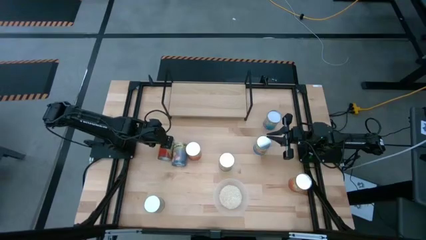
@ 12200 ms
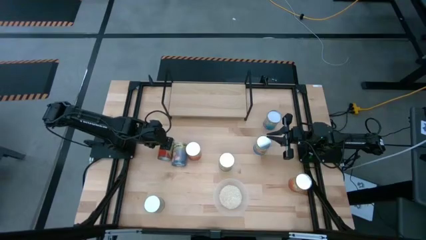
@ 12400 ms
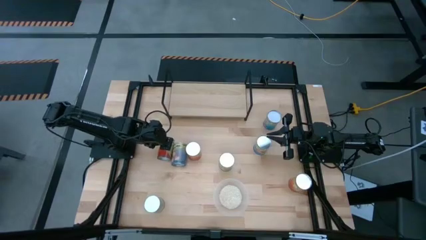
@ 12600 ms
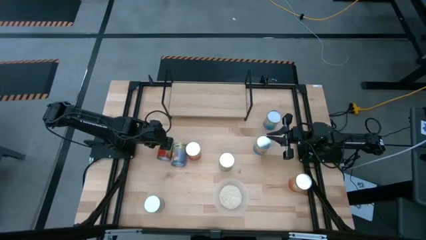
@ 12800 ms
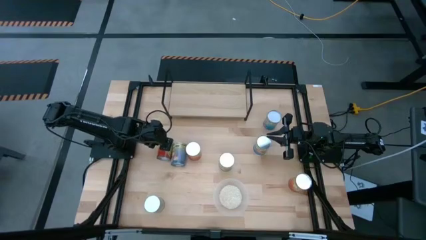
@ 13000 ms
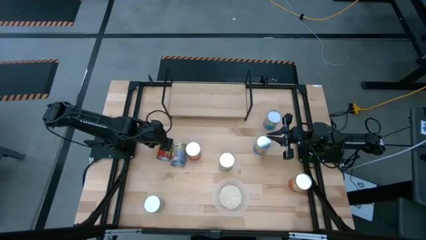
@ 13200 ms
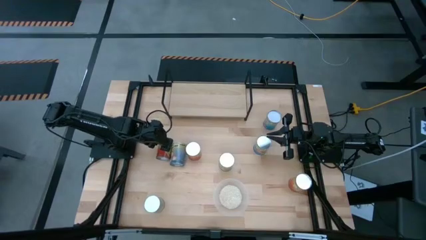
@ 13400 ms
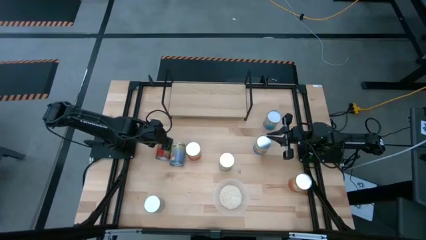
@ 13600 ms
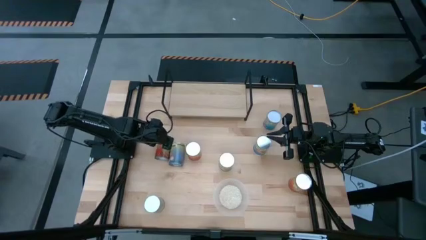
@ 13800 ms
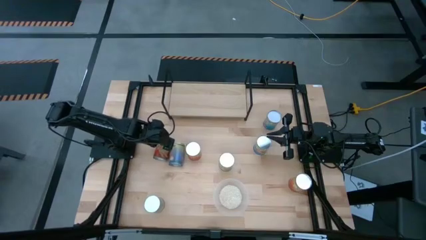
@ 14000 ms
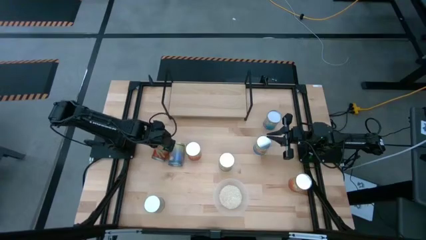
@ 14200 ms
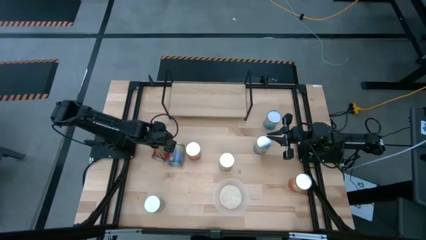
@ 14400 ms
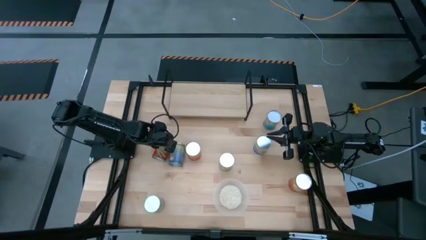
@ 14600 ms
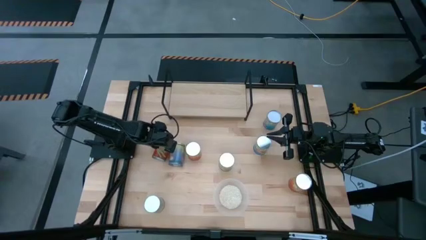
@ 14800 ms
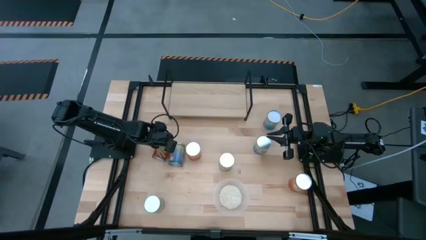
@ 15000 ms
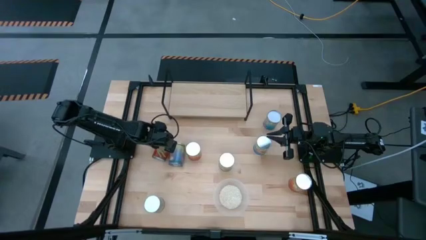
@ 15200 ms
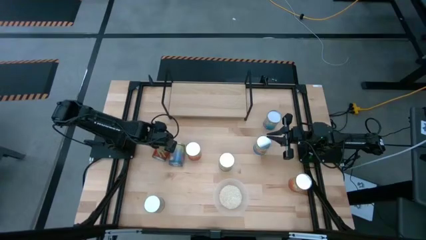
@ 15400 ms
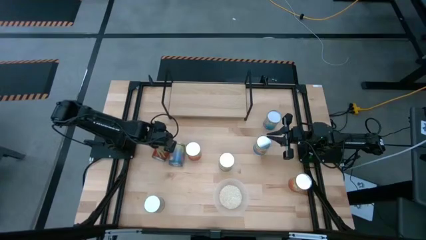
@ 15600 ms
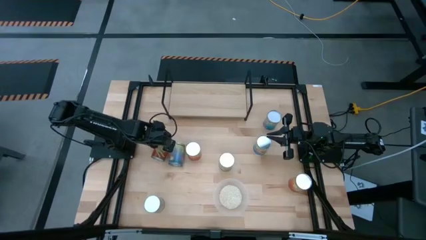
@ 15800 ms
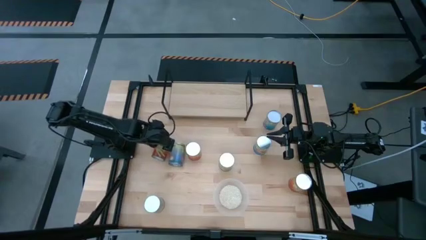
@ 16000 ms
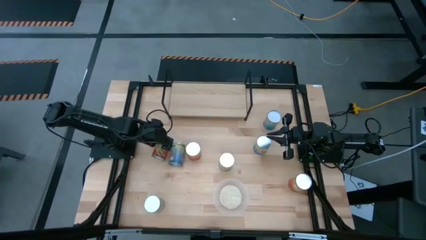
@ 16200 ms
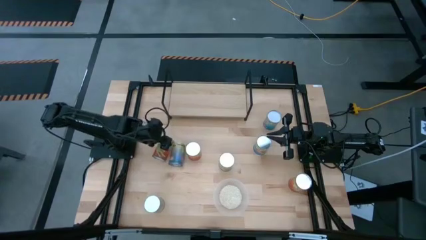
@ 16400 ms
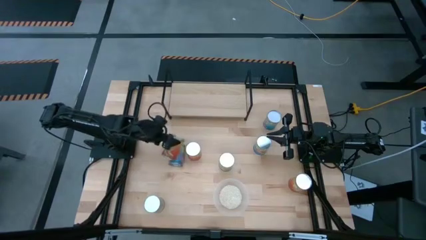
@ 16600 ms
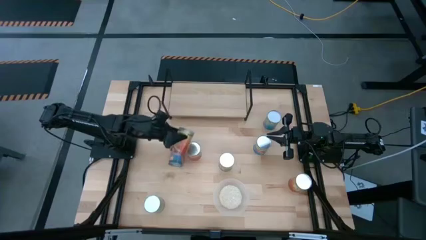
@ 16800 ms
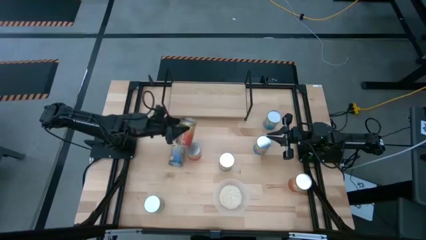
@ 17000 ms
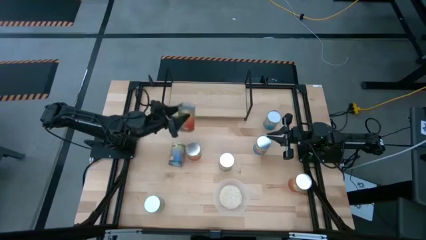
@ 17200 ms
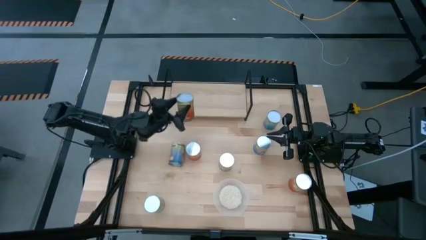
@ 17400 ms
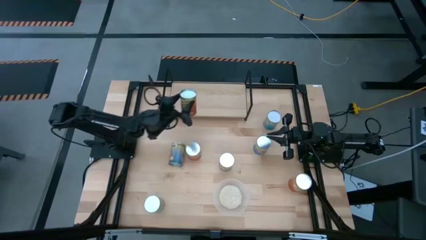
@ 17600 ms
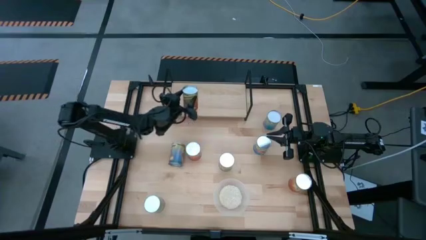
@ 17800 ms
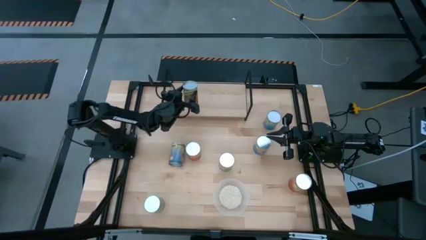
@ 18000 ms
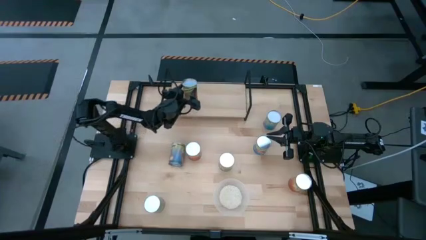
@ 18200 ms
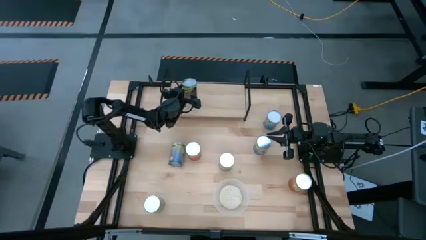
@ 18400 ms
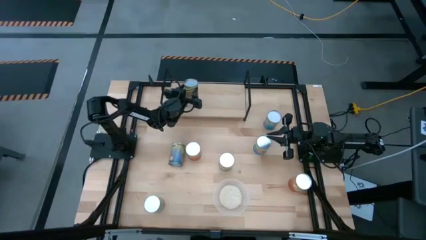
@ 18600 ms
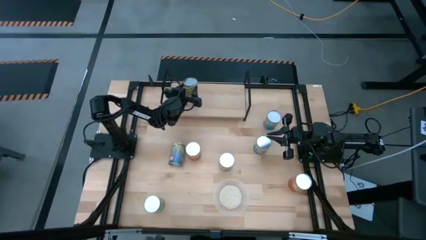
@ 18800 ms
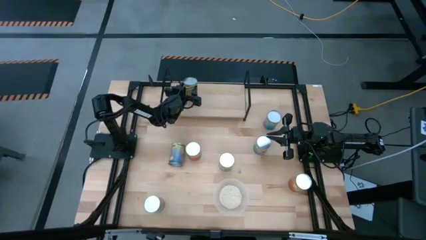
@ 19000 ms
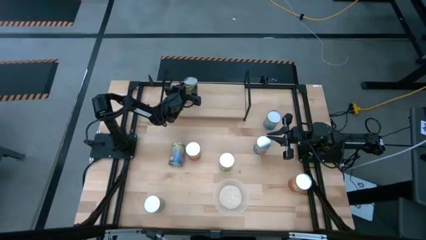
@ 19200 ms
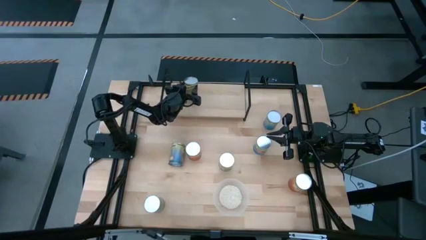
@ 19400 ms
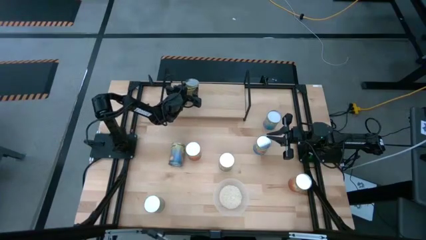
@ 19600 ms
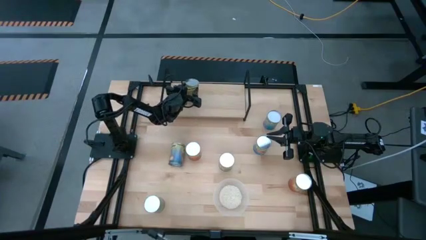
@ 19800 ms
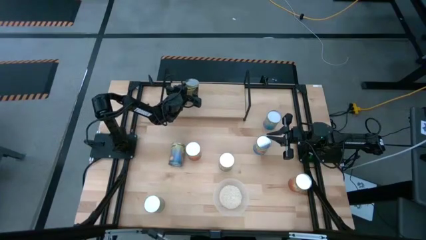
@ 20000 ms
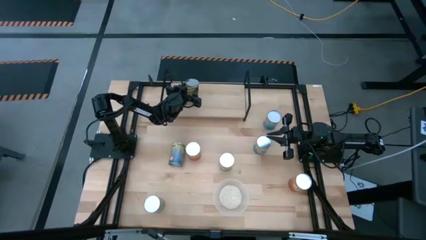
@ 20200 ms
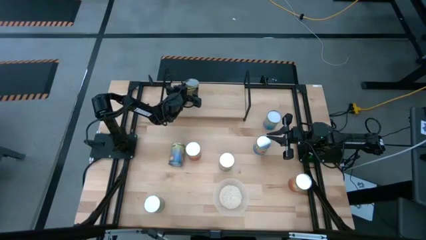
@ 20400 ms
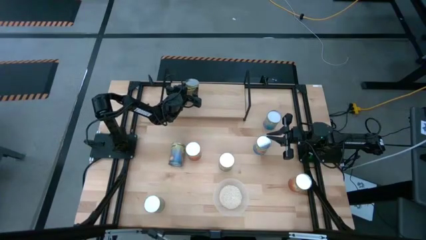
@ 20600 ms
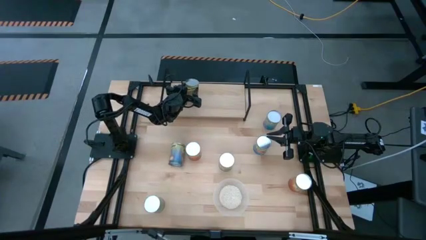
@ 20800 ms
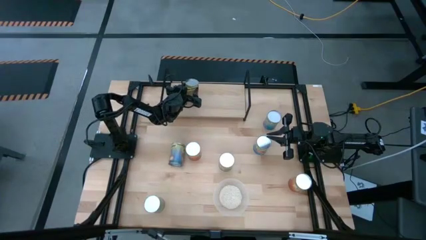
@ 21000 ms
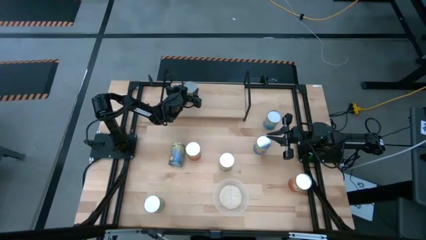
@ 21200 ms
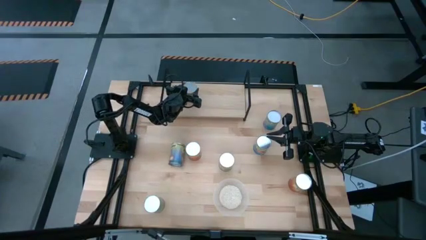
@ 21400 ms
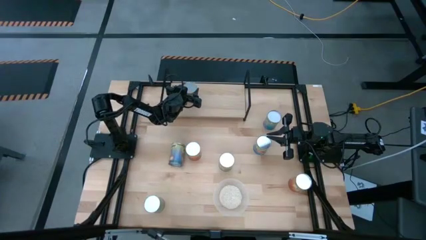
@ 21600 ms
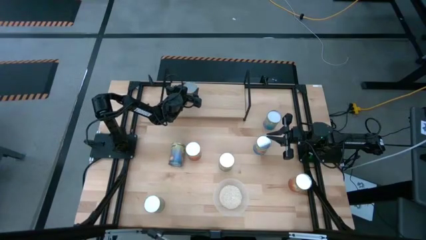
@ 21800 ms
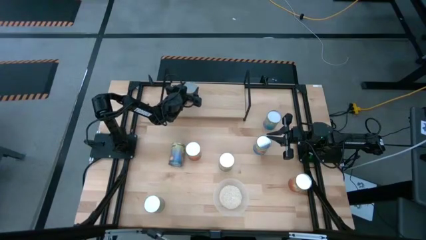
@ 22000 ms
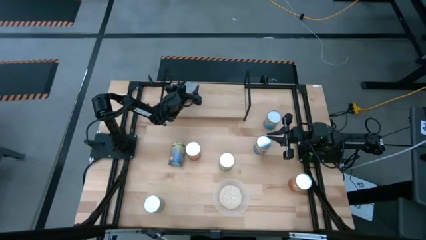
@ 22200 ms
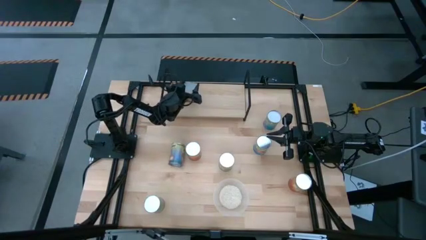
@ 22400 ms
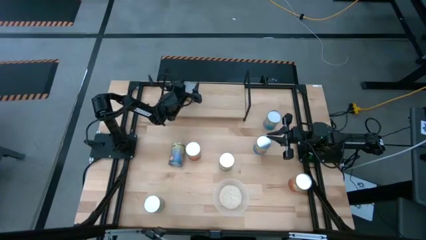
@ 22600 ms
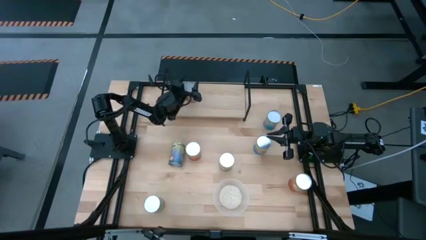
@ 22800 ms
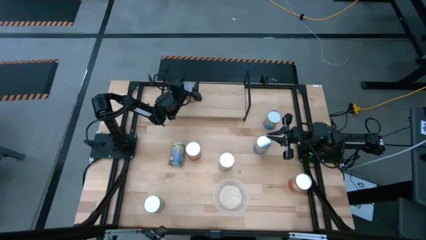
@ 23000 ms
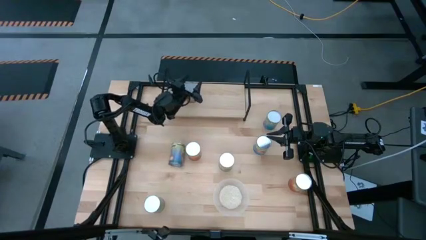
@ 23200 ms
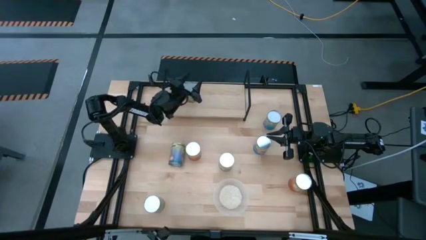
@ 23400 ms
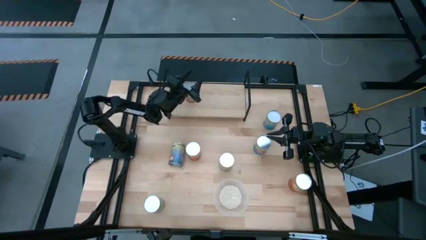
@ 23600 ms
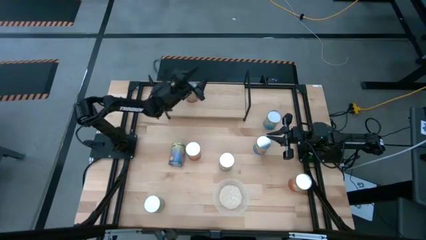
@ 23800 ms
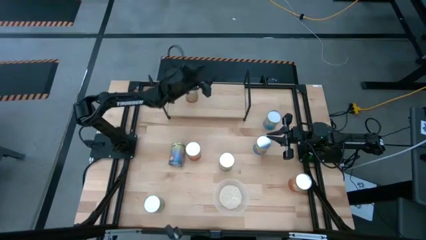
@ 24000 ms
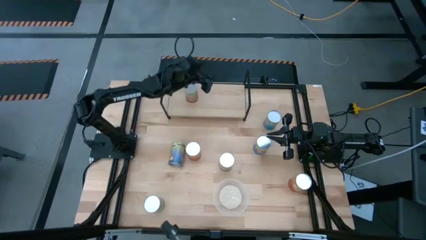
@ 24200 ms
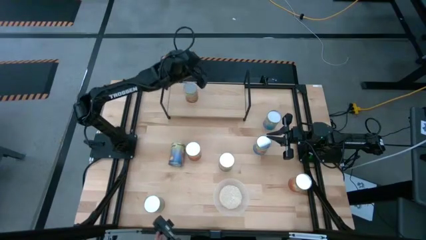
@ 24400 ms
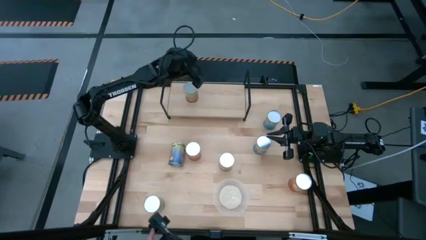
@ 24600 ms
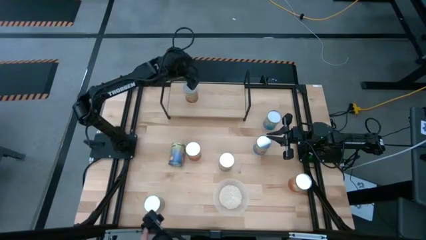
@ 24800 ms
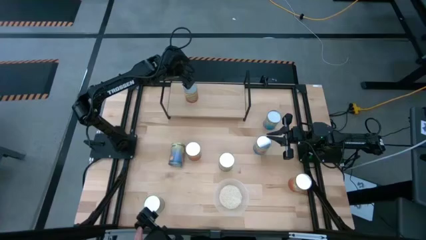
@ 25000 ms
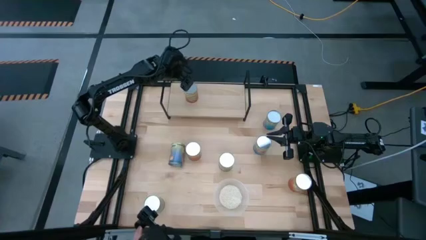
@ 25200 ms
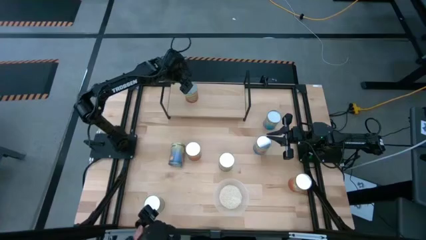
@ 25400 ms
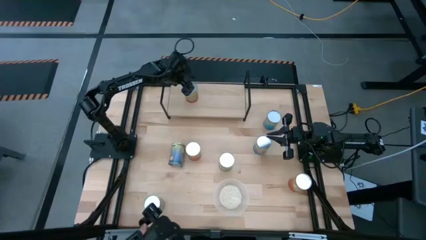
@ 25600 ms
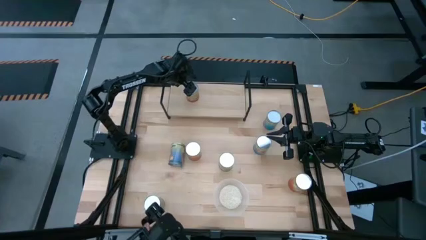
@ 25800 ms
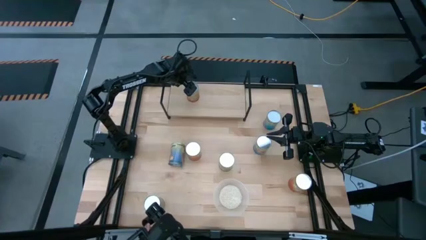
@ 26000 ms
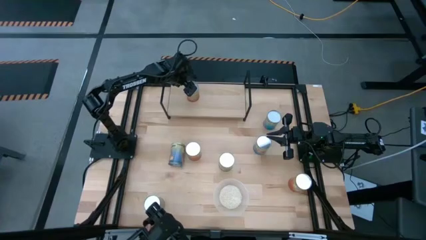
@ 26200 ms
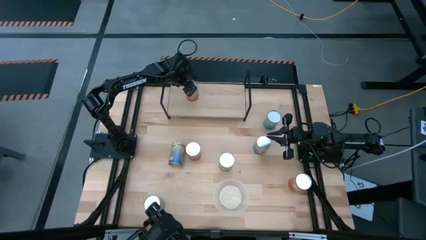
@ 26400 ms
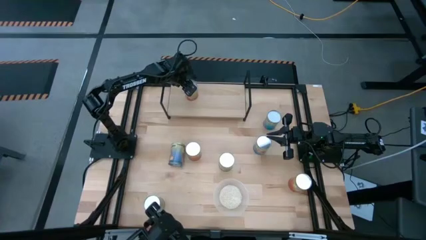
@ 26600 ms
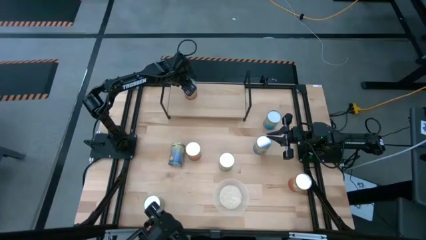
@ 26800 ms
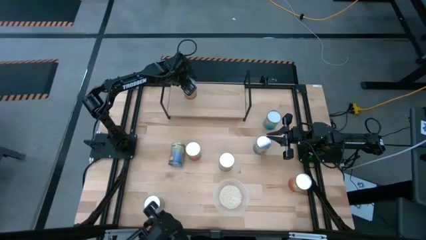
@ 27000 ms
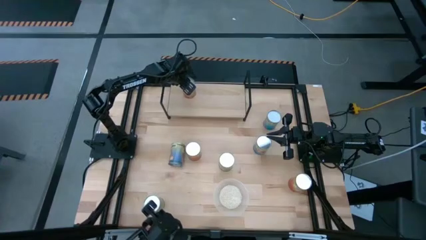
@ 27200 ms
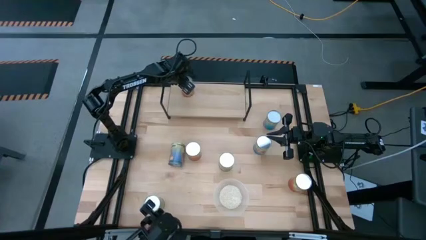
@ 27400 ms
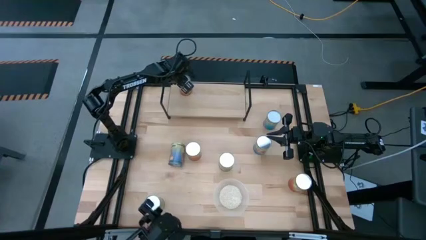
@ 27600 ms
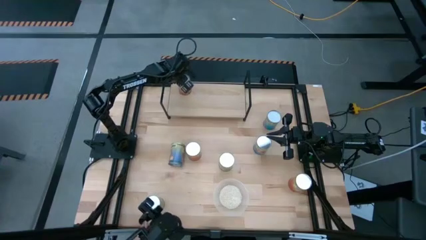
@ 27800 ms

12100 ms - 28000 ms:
Task: Pick and place cans onto a shelf
Put the canned green bean on the shelf
